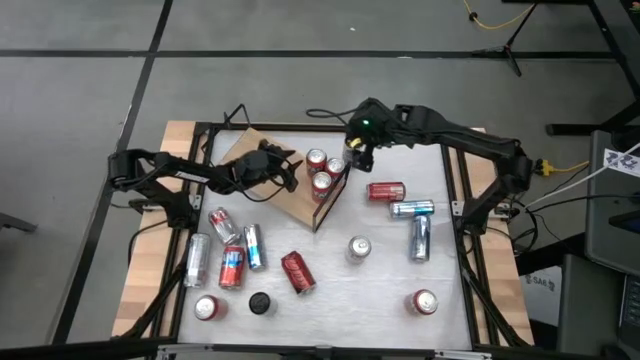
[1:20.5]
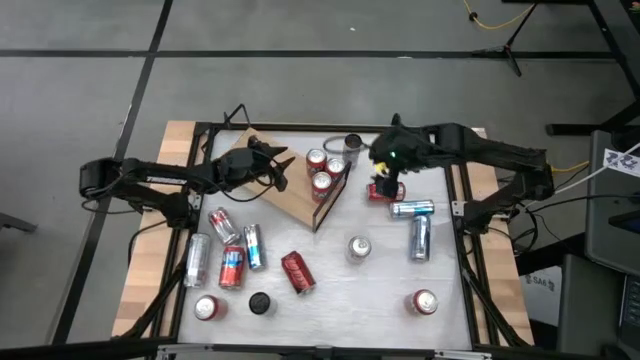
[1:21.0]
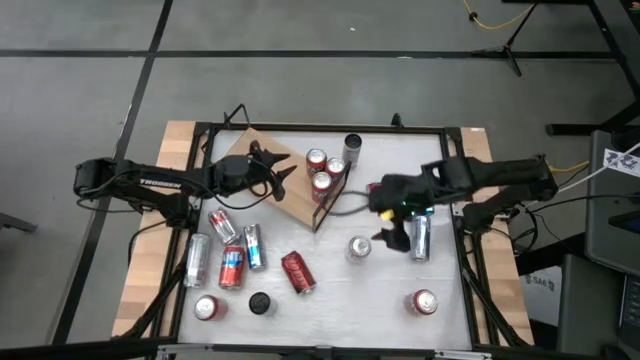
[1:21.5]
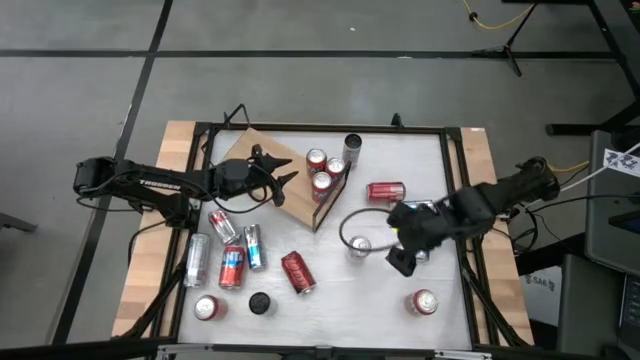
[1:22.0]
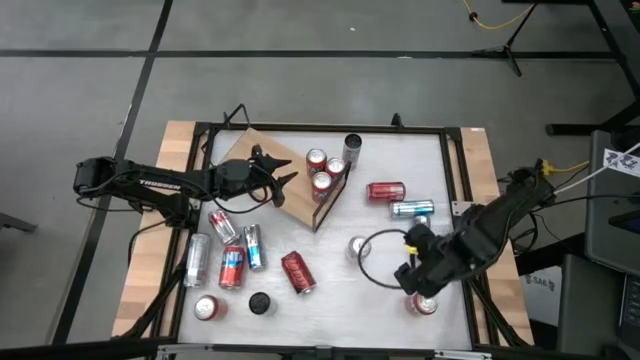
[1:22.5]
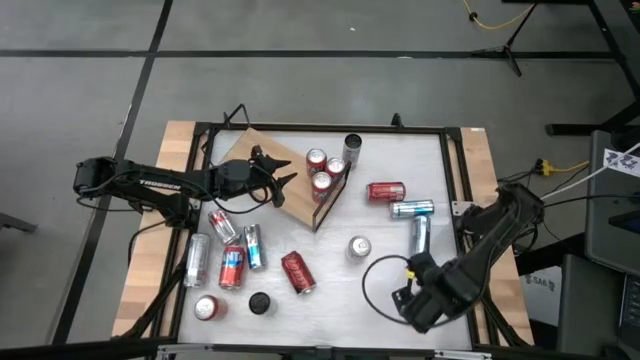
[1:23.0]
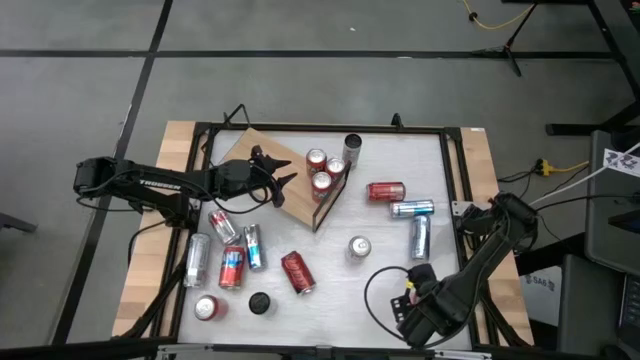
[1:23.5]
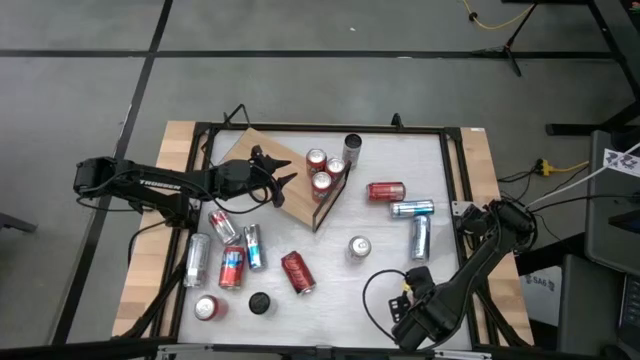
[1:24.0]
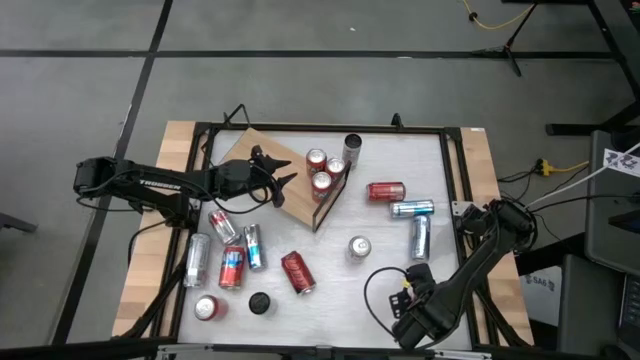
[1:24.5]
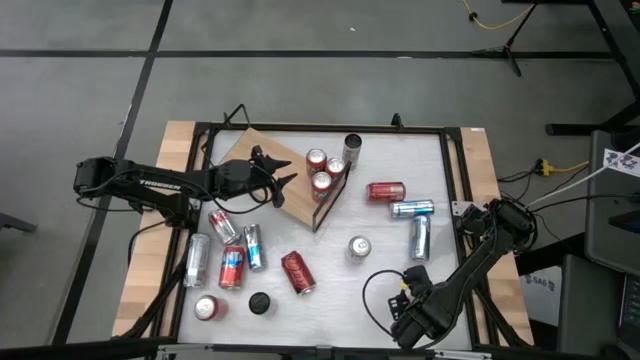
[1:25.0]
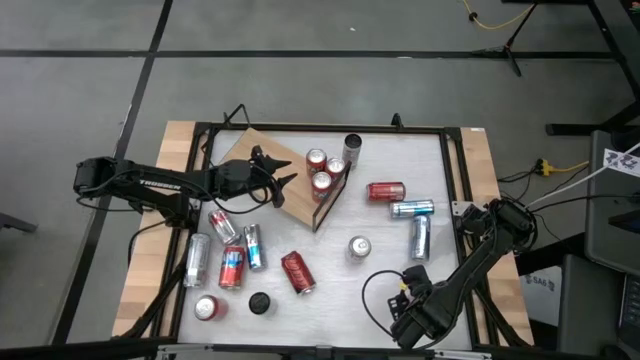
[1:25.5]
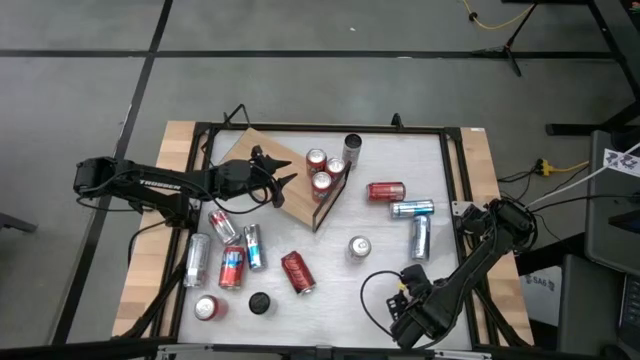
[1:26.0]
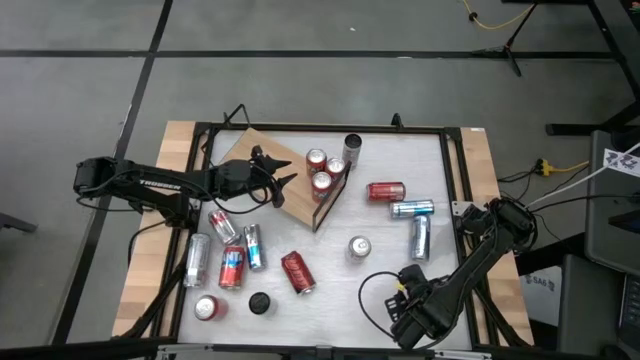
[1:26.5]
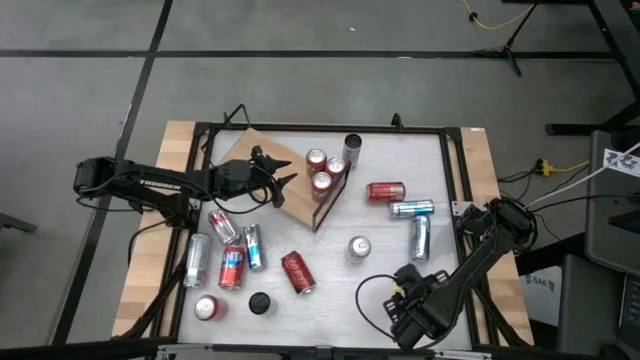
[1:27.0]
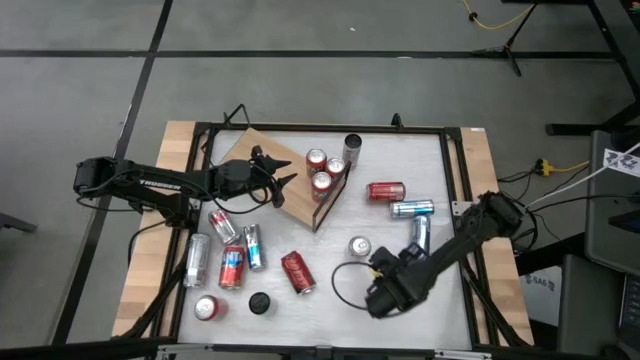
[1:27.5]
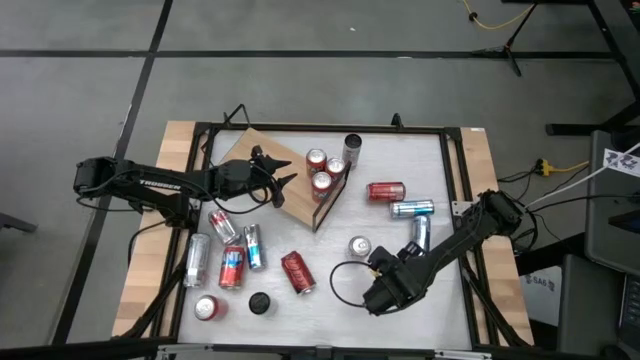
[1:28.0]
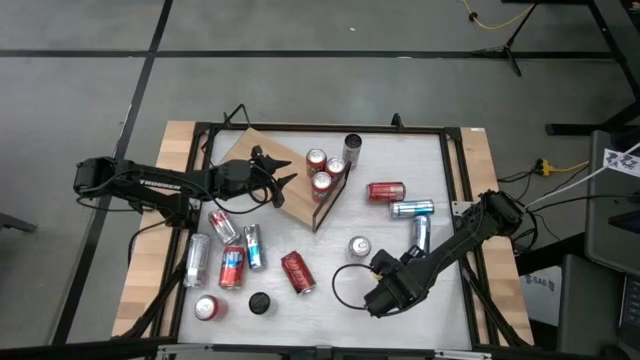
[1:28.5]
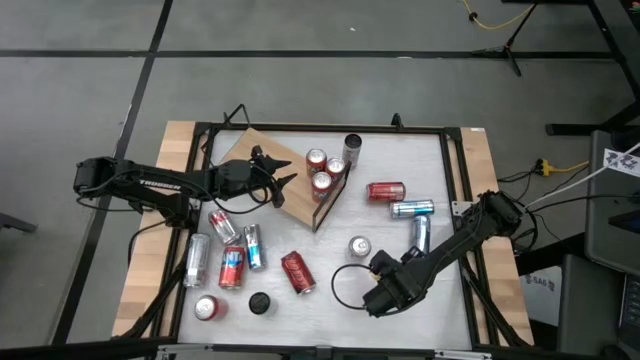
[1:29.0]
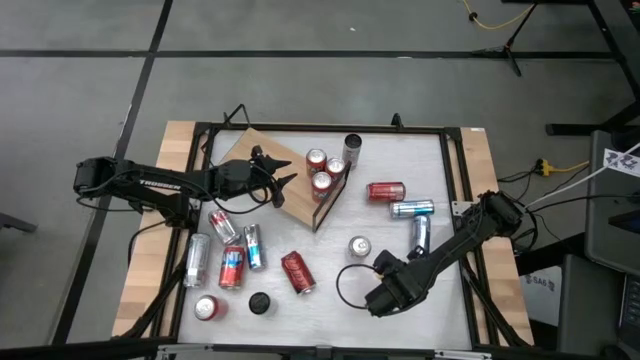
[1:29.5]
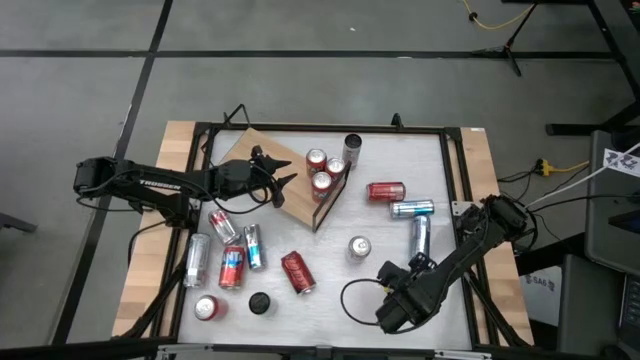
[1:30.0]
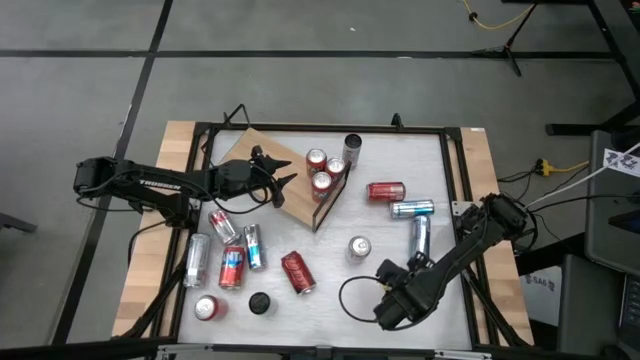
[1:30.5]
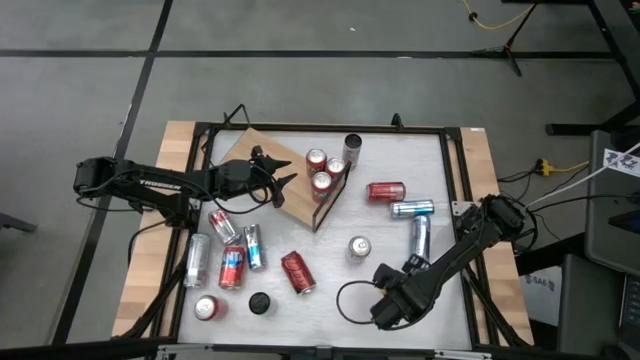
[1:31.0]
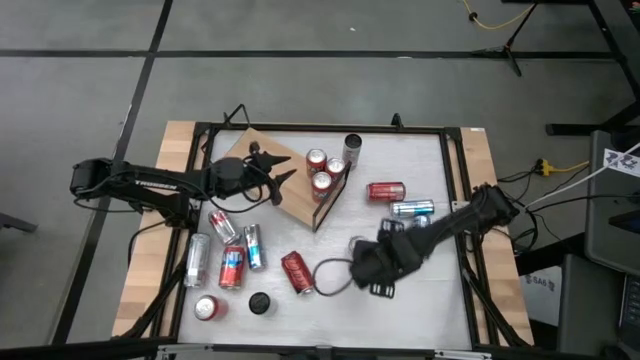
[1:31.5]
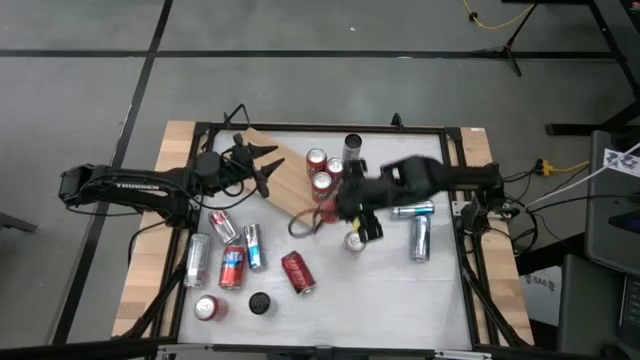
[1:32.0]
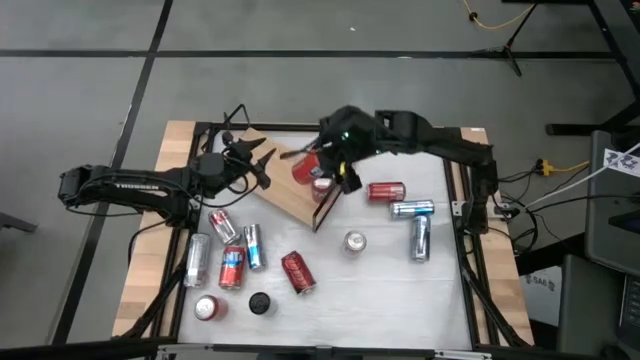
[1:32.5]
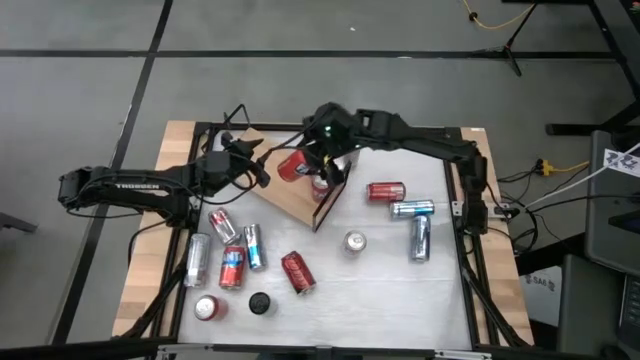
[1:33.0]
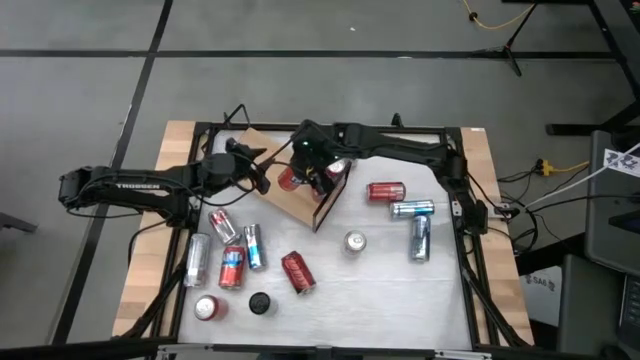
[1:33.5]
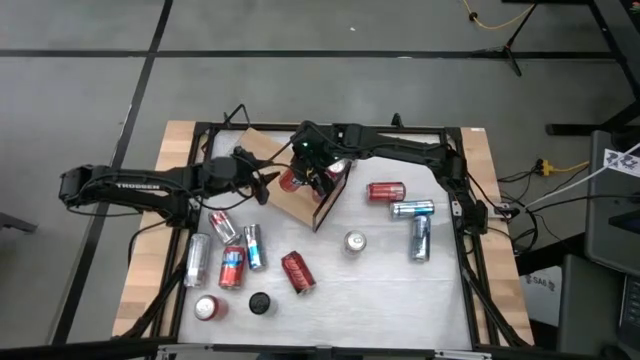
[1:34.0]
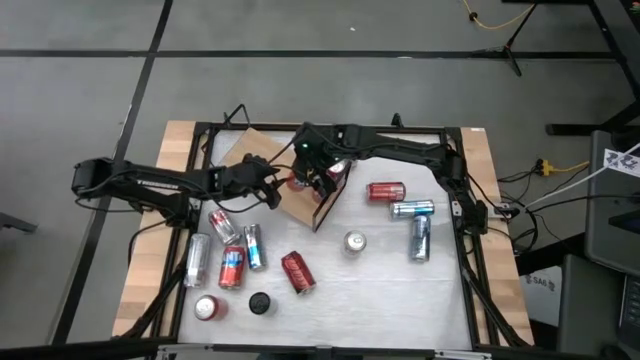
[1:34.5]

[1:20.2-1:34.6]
Task: Pick and place cans onto a shelf
Put the bottom right red soda can on the shelf aligned with the other red soda can

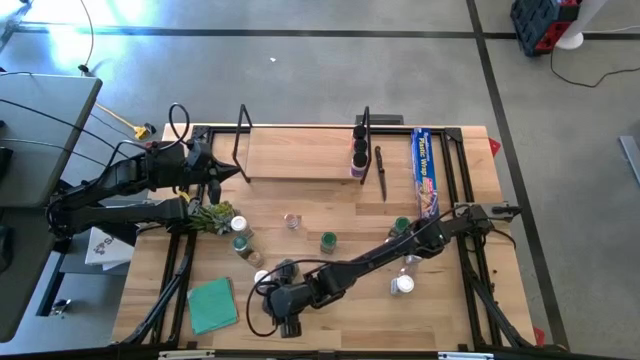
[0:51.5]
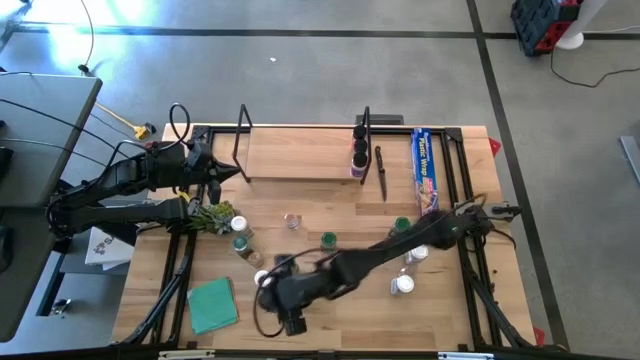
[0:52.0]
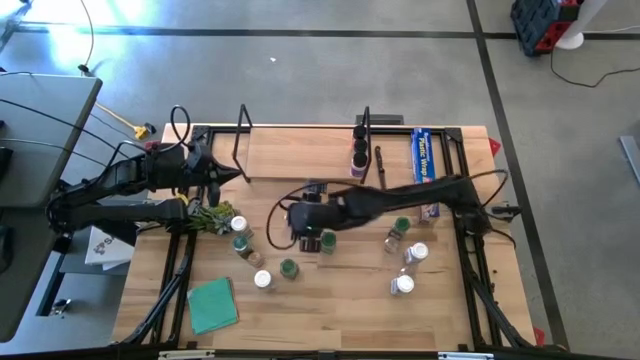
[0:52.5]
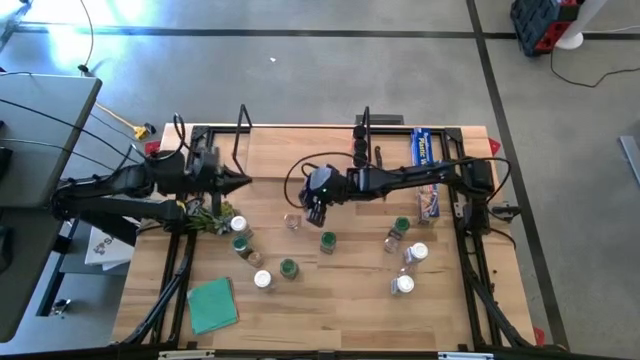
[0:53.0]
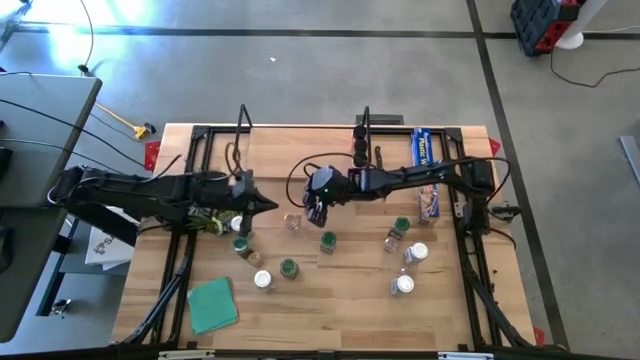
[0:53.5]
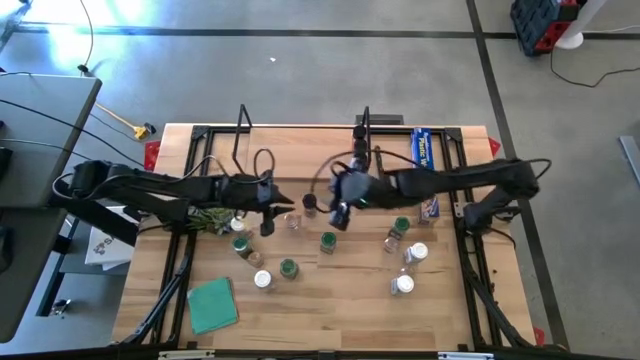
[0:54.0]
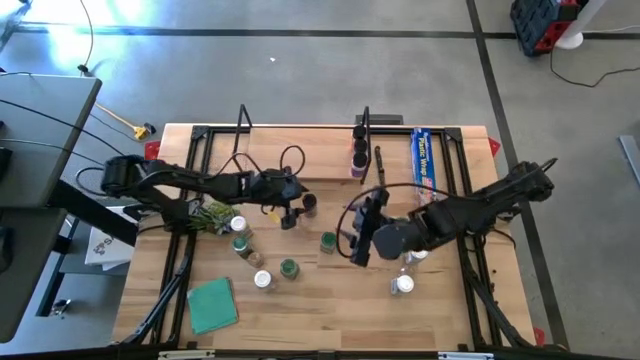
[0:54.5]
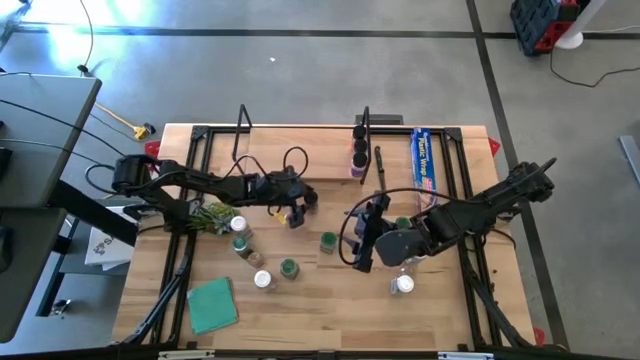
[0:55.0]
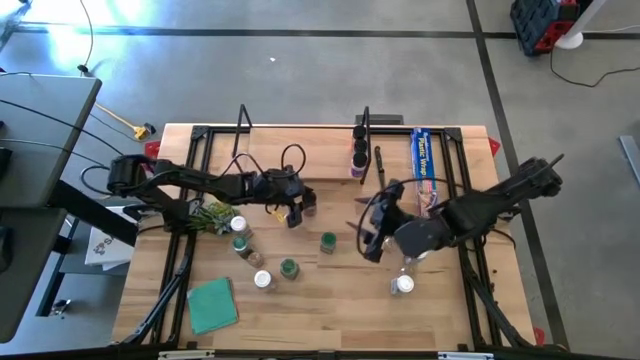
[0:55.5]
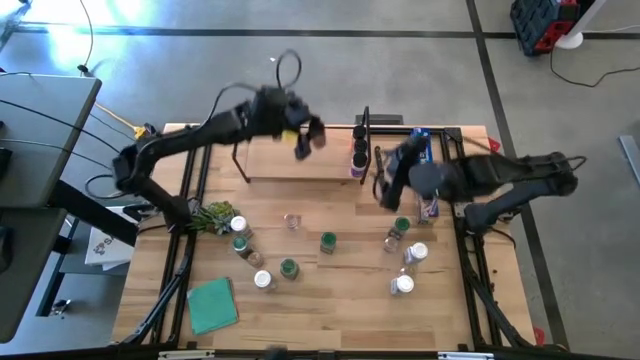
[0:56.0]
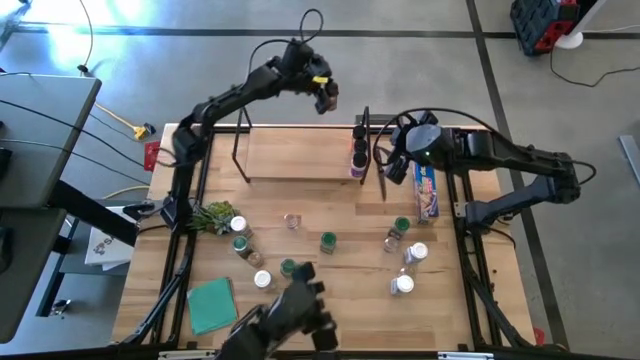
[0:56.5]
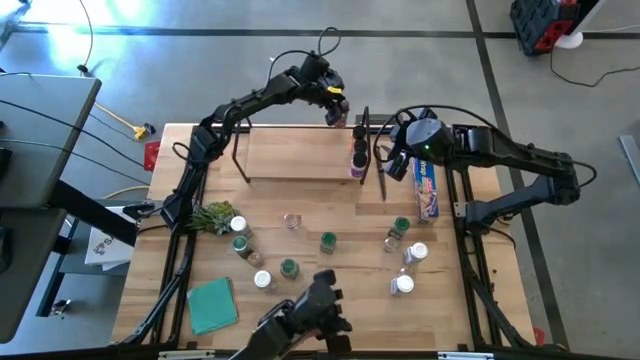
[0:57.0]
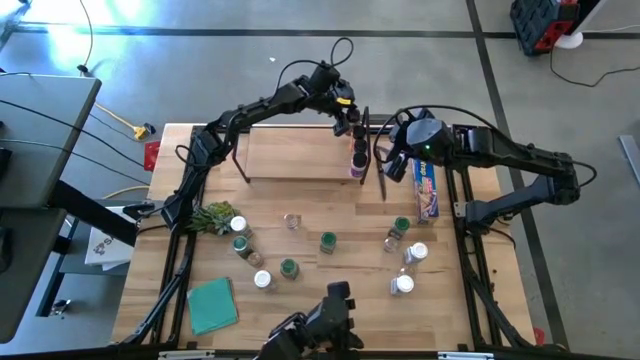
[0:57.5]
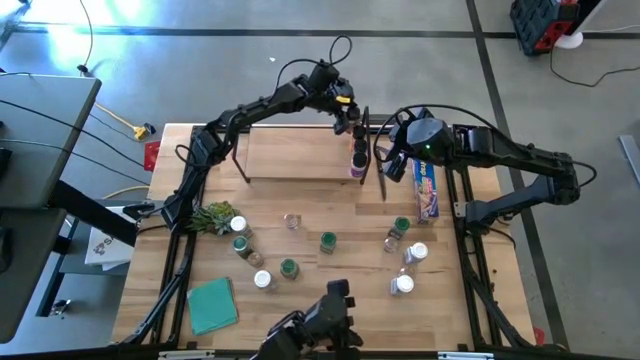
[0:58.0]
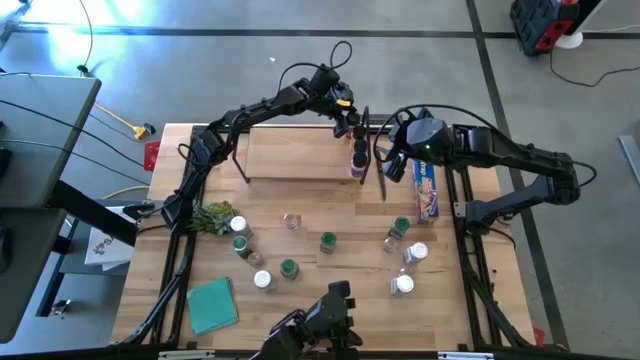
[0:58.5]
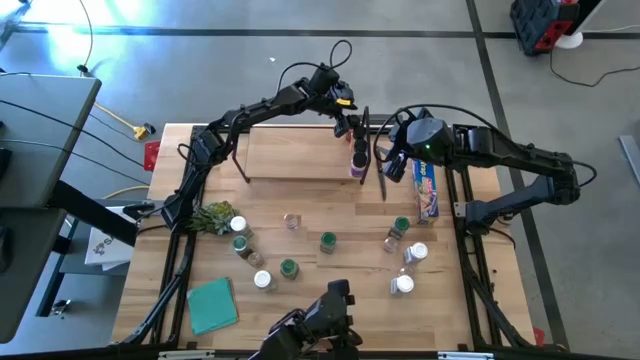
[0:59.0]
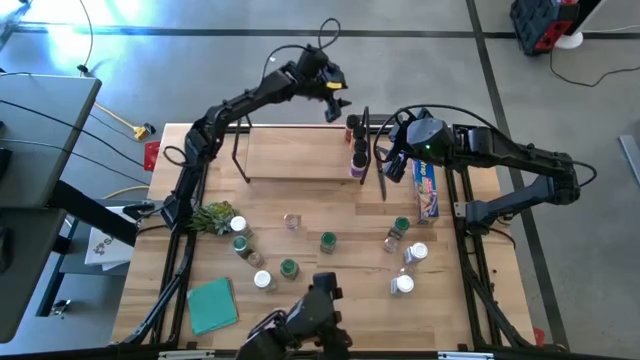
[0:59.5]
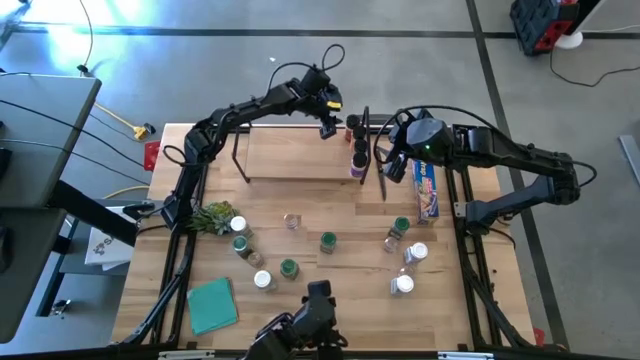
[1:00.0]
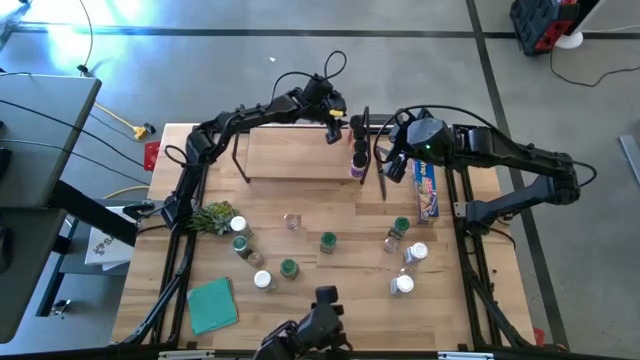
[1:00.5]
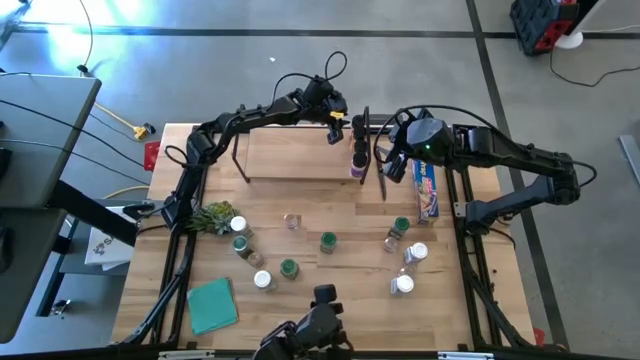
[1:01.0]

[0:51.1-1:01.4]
Task: Shelf spices
Put the black seasoning bottle on the shelf aligned with the other black seasoning bottles
